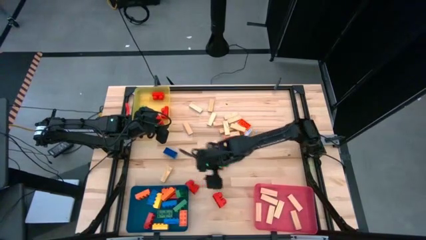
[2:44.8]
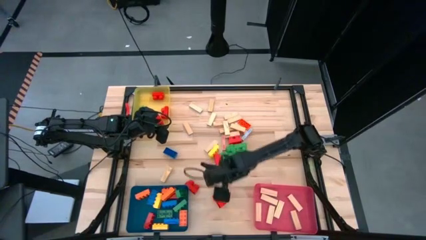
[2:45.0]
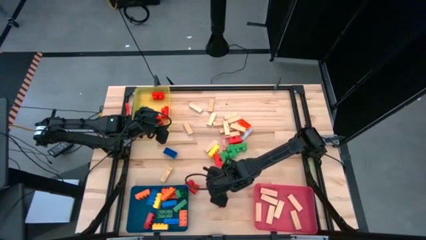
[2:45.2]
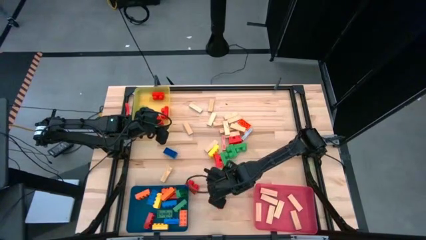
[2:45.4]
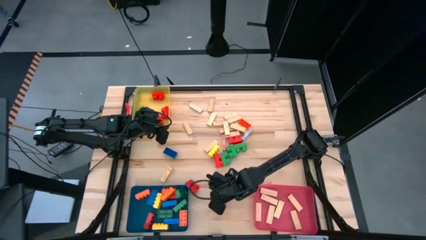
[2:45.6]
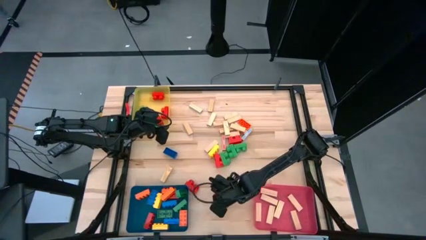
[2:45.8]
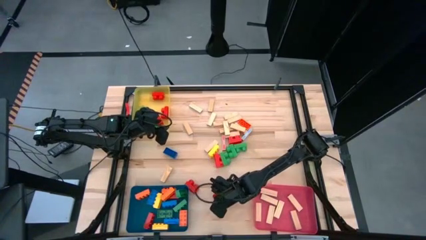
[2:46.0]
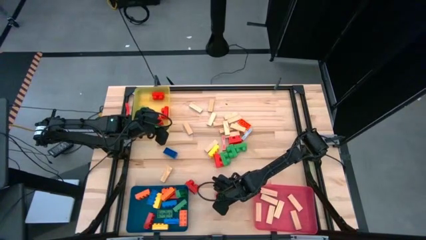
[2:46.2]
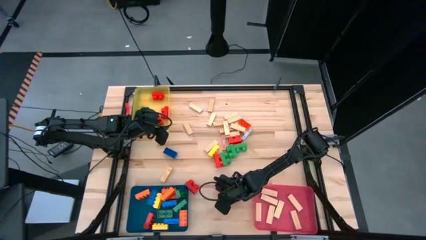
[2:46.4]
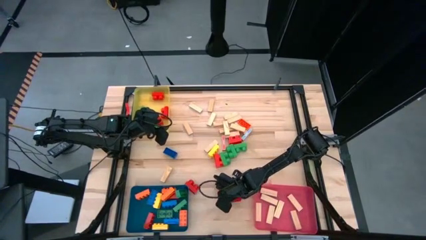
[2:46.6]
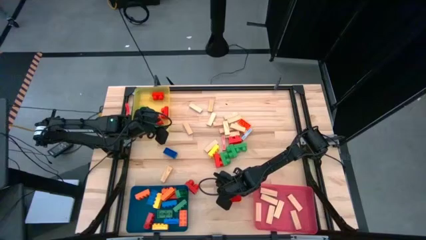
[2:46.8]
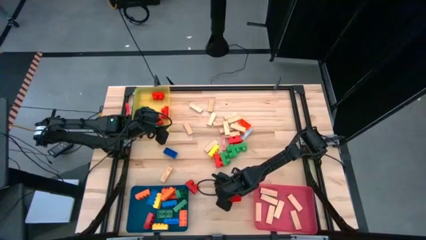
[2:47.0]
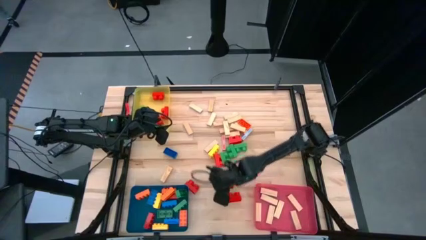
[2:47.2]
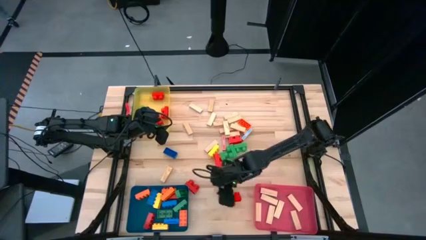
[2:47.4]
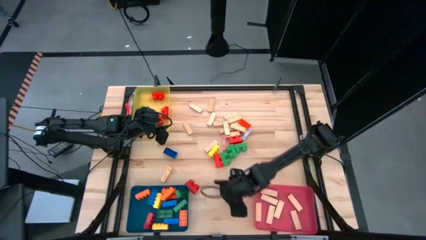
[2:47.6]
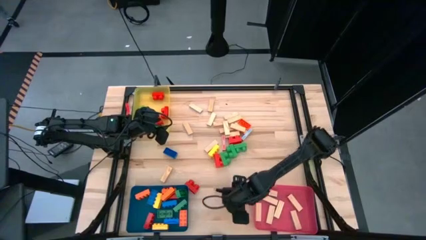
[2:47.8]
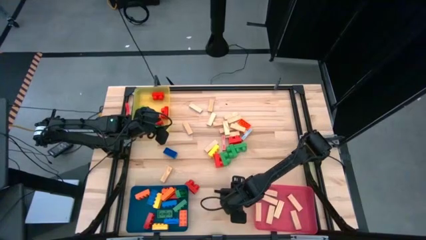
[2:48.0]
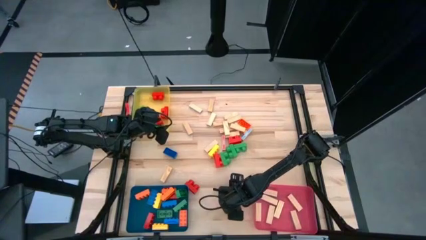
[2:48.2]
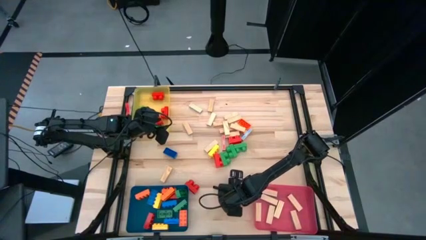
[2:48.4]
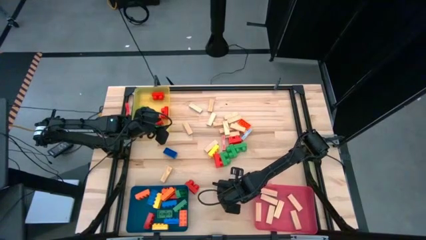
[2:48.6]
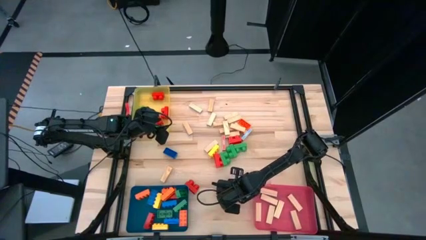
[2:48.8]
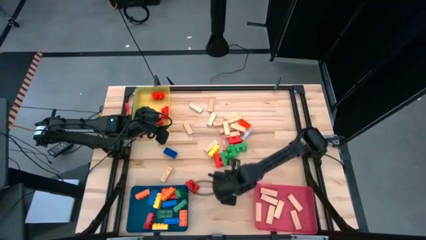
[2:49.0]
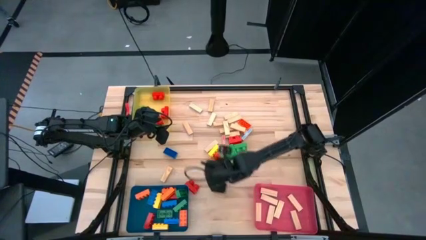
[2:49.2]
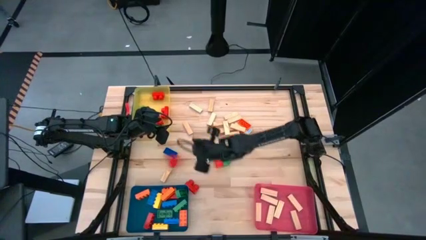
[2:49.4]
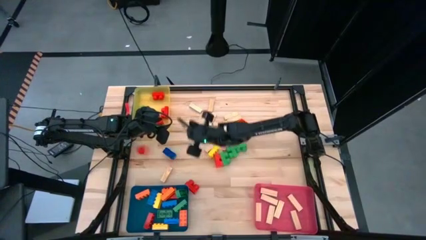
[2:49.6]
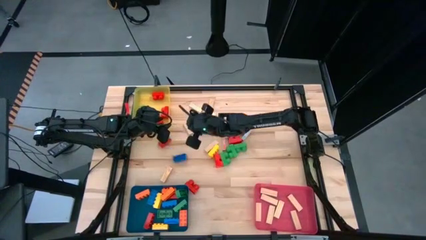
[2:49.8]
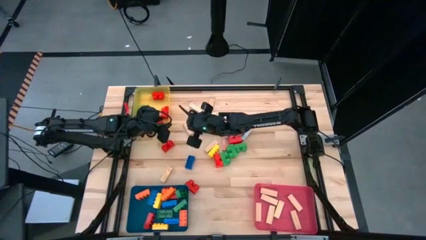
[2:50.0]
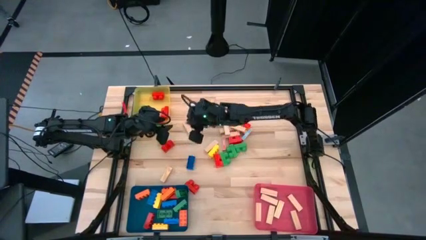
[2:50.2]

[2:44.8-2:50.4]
Task: Sort blocks by size
Put the round orange game piece into the yellow bin

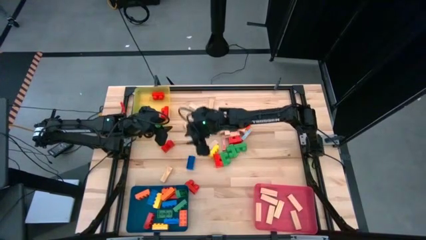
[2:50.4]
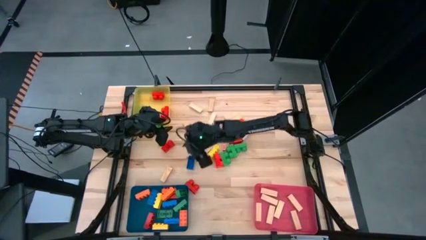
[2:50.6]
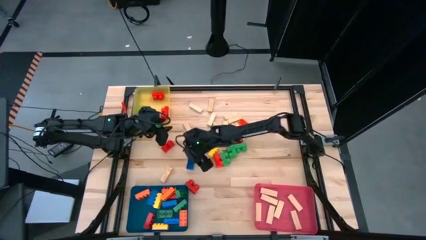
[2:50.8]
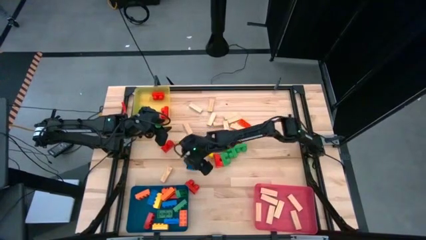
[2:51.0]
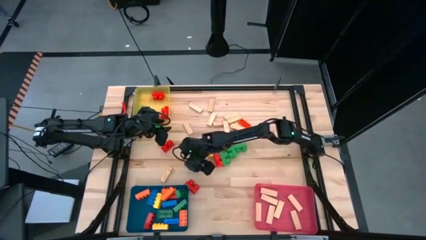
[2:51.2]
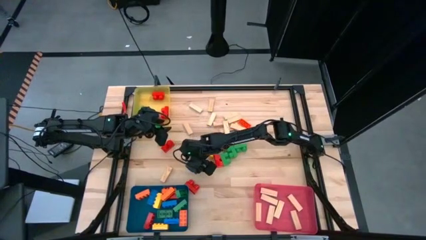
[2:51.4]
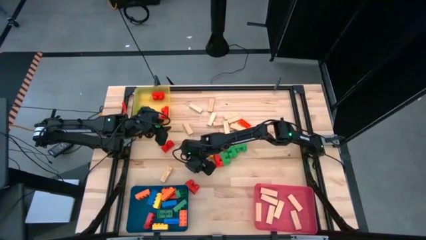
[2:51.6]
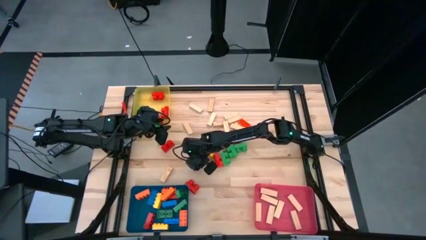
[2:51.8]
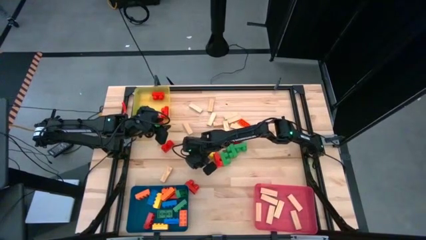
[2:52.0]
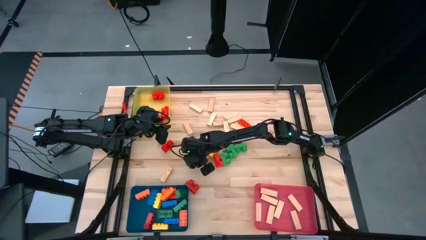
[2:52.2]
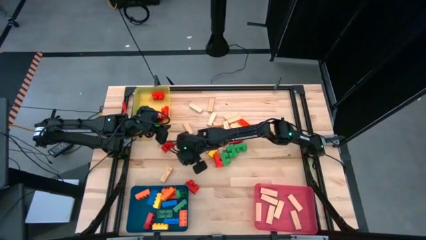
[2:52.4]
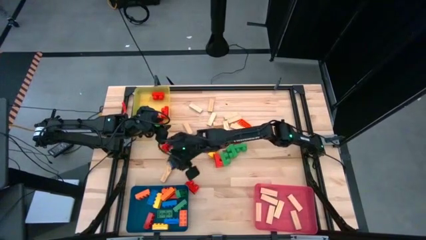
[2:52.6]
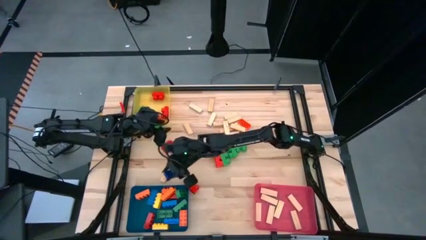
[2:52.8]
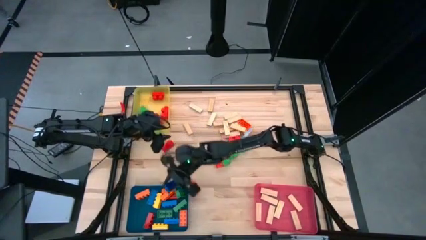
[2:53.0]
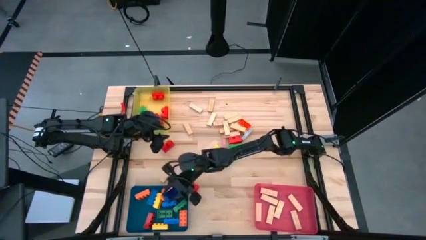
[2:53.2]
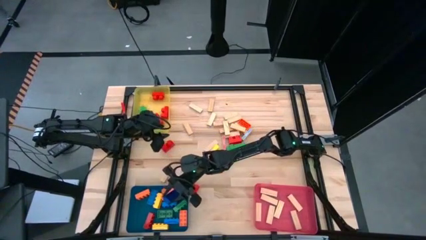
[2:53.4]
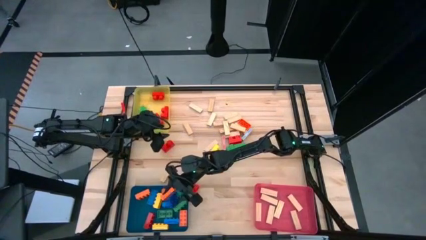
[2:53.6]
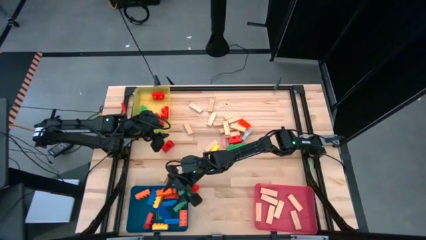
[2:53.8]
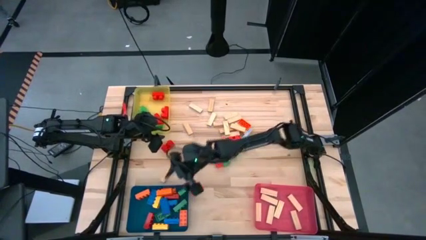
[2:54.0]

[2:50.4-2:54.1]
Put the blue game piece into the blue bin

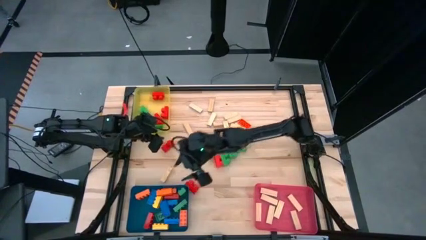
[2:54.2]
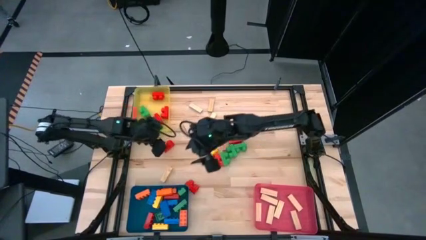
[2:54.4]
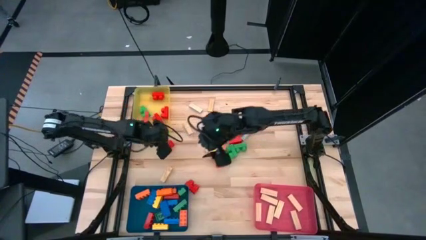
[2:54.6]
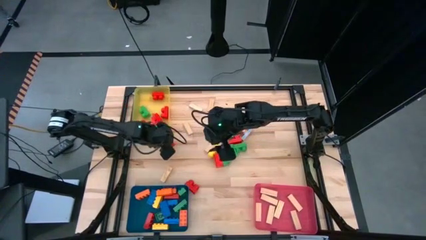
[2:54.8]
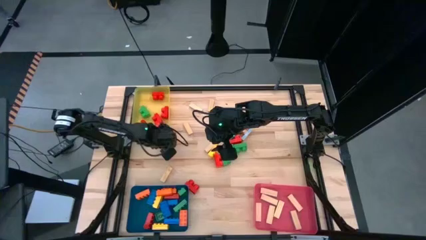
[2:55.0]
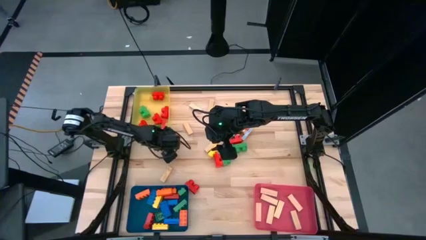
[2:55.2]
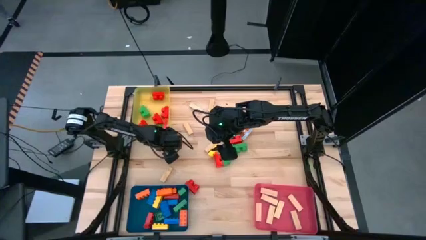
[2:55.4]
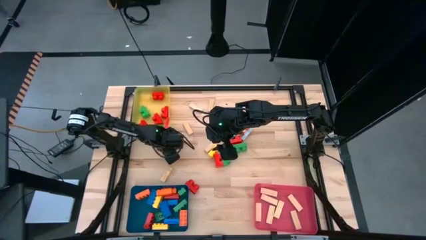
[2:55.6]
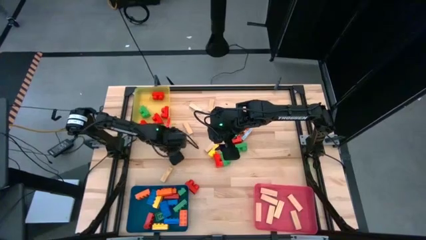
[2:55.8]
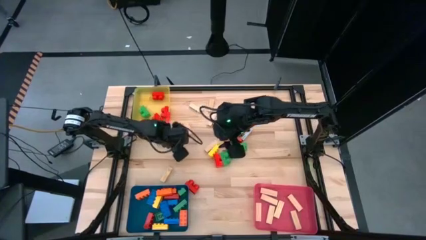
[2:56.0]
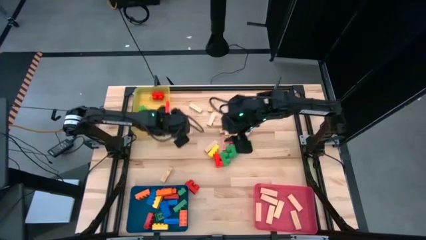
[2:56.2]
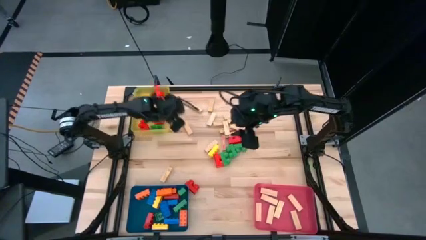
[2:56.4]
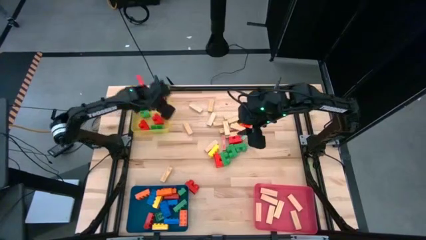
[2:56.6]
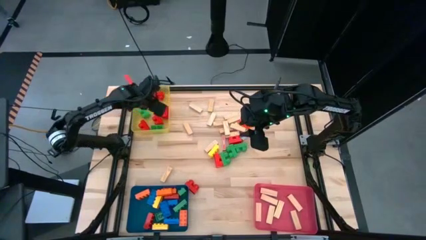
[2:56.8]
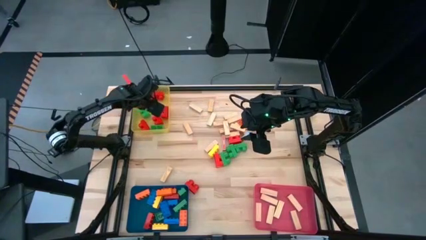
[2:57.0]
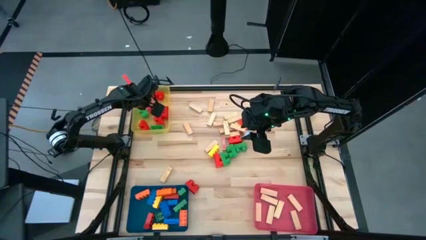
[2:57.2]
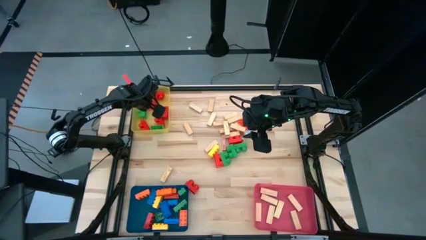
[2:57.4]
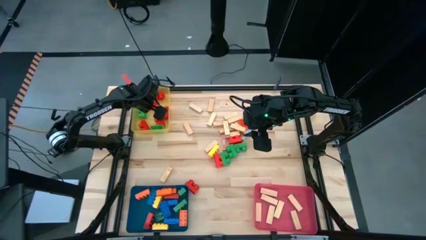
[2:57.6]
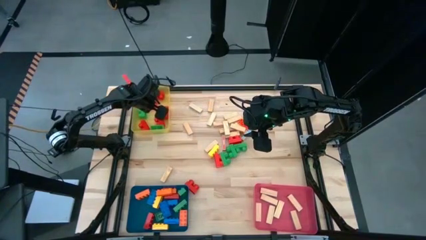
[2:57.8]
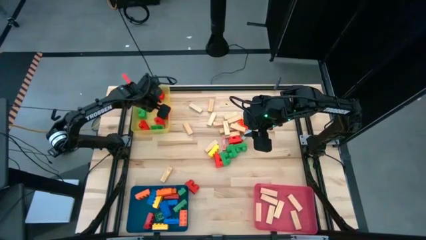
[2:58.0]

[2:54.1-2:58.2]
Put the round red game piece into the yellow bin
